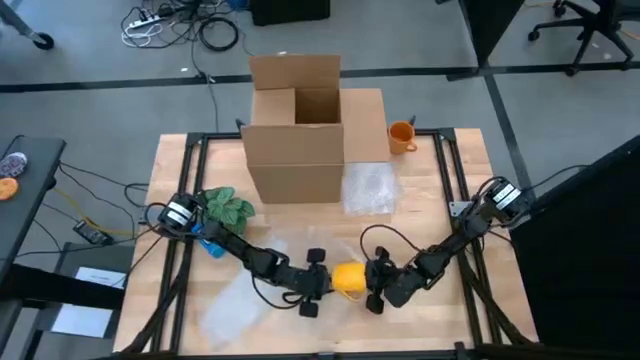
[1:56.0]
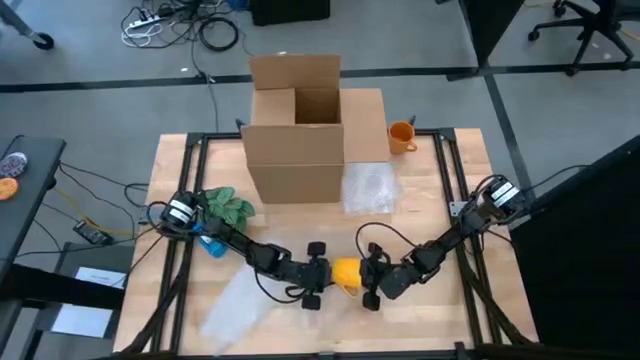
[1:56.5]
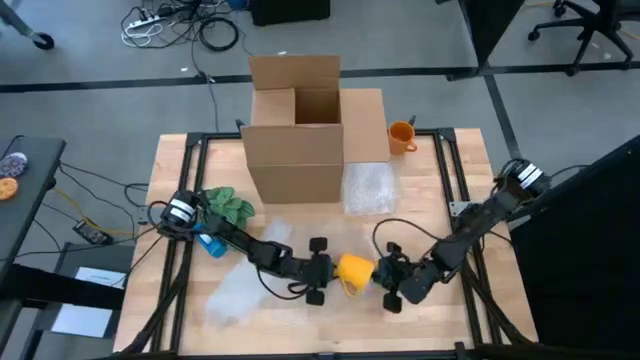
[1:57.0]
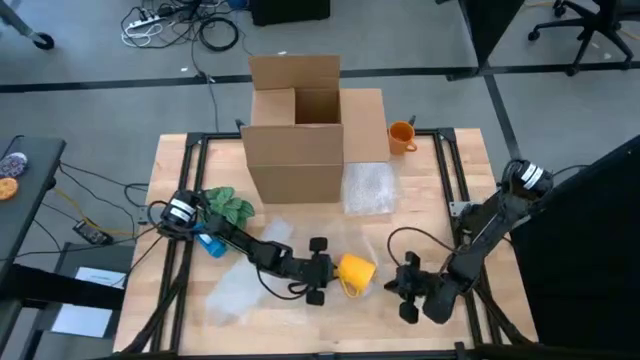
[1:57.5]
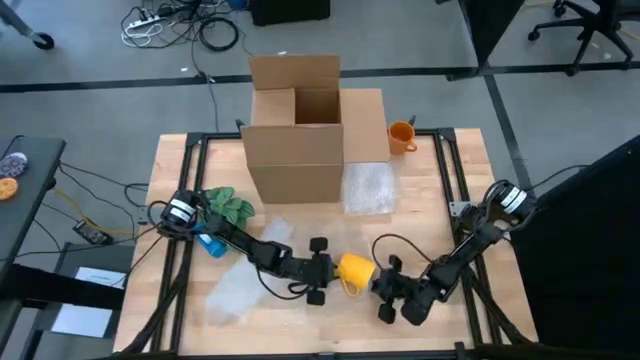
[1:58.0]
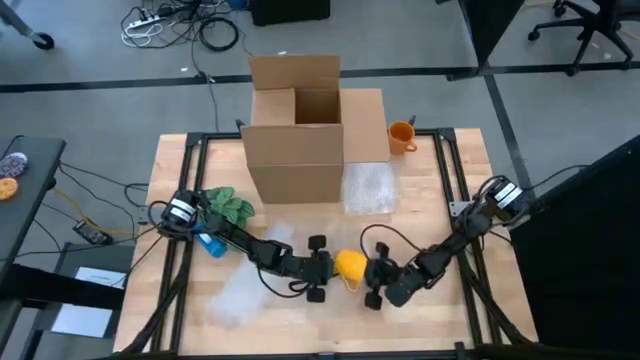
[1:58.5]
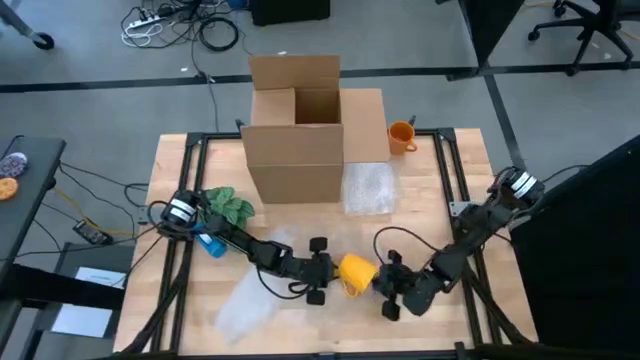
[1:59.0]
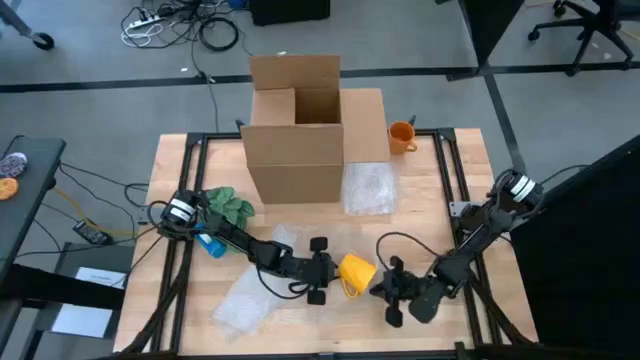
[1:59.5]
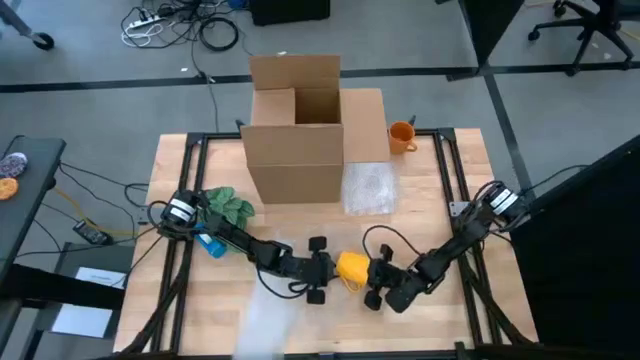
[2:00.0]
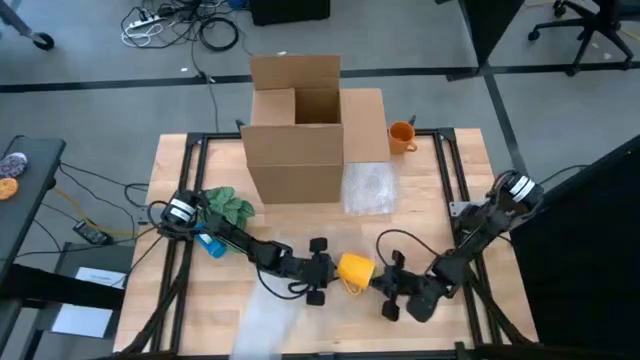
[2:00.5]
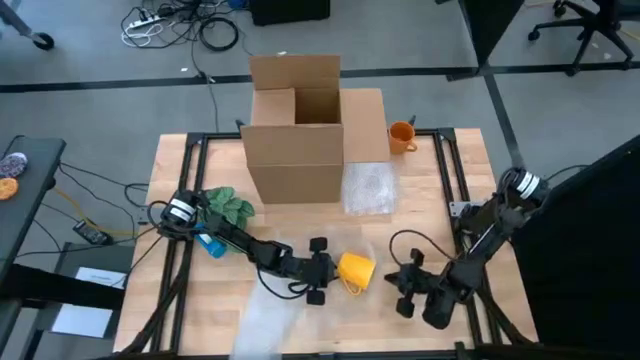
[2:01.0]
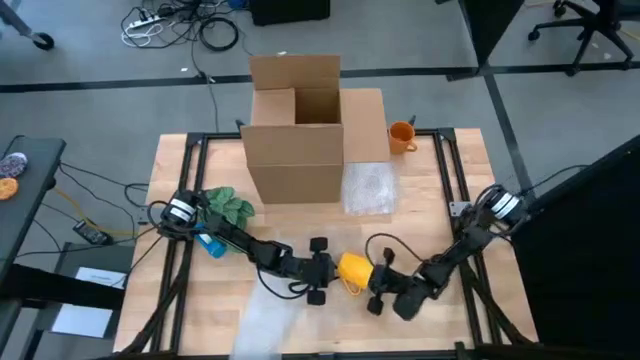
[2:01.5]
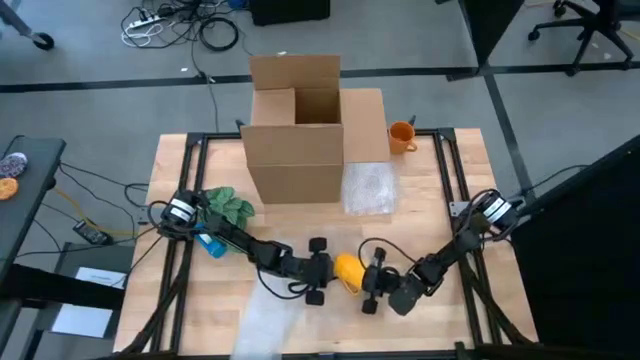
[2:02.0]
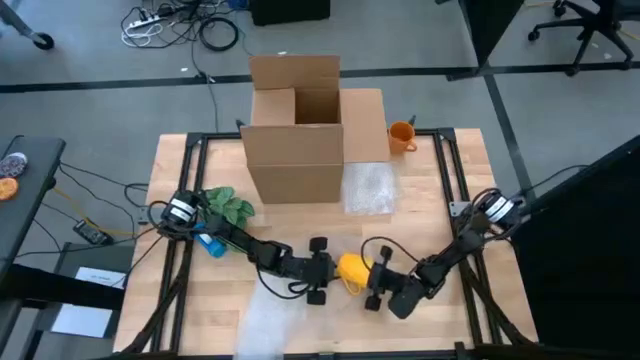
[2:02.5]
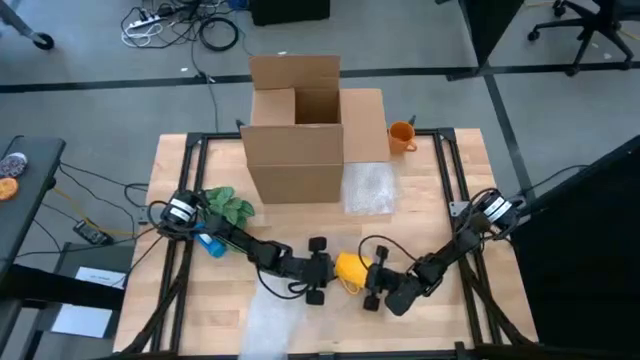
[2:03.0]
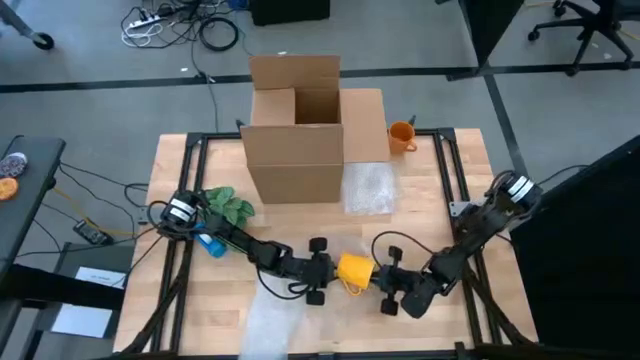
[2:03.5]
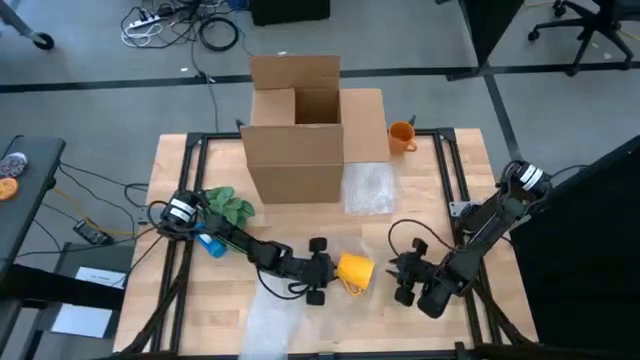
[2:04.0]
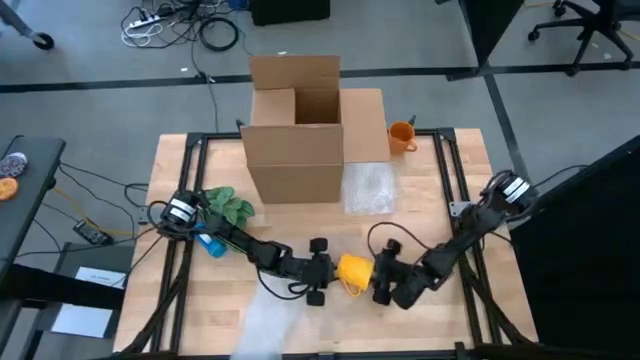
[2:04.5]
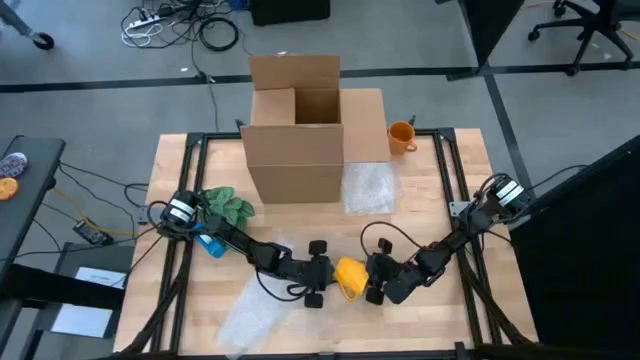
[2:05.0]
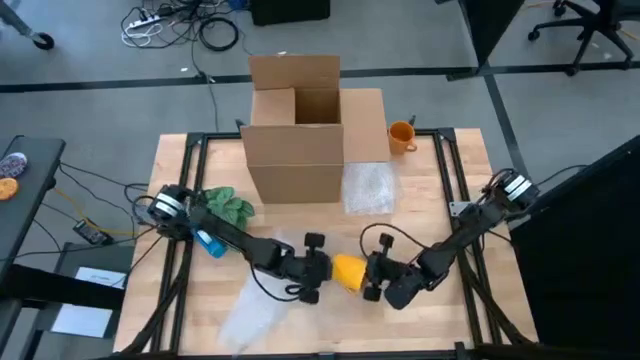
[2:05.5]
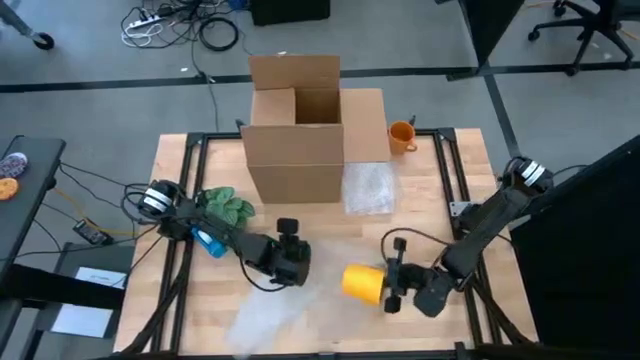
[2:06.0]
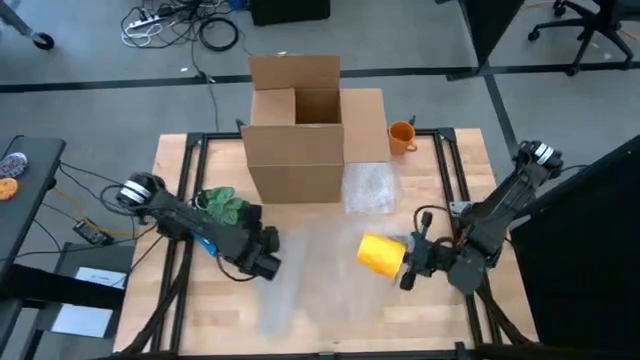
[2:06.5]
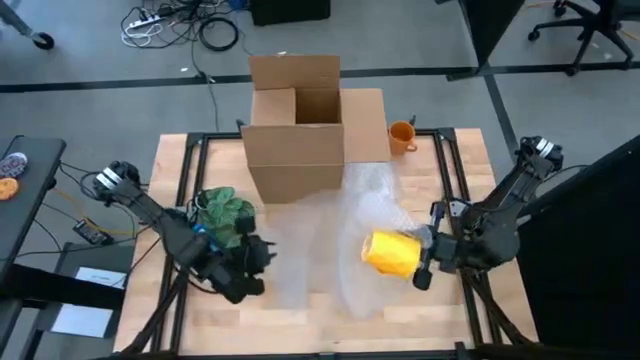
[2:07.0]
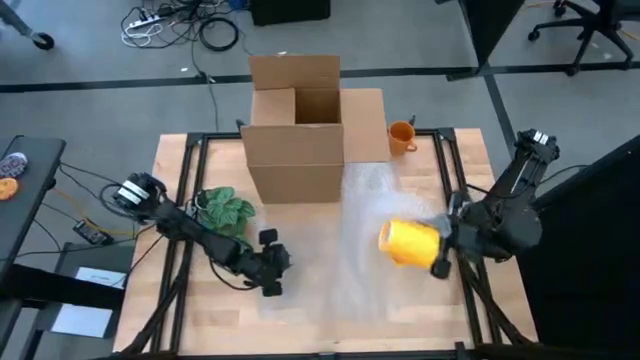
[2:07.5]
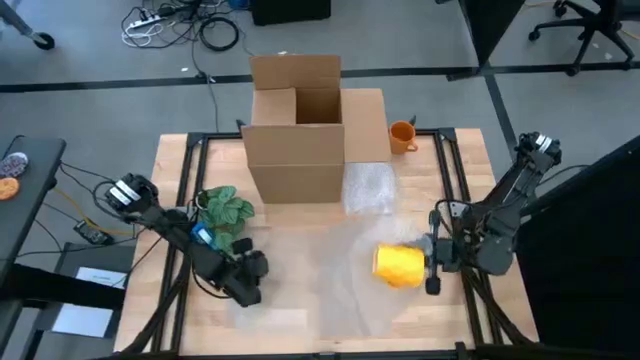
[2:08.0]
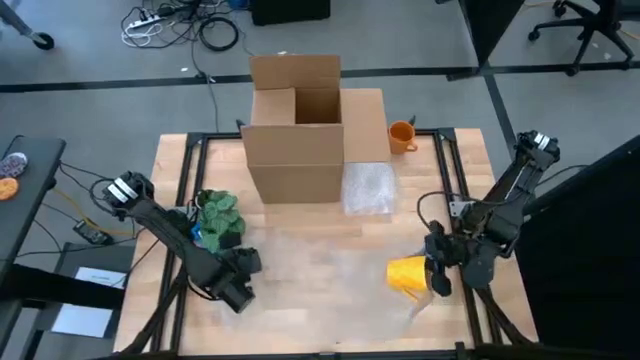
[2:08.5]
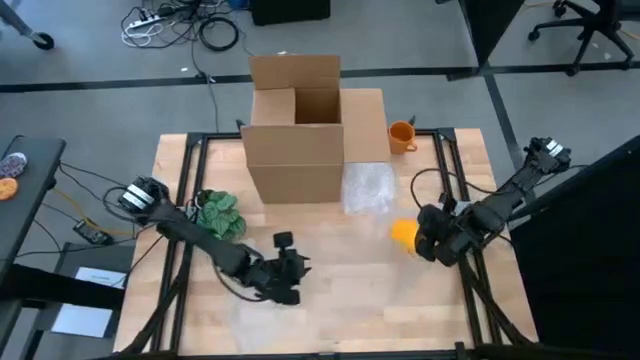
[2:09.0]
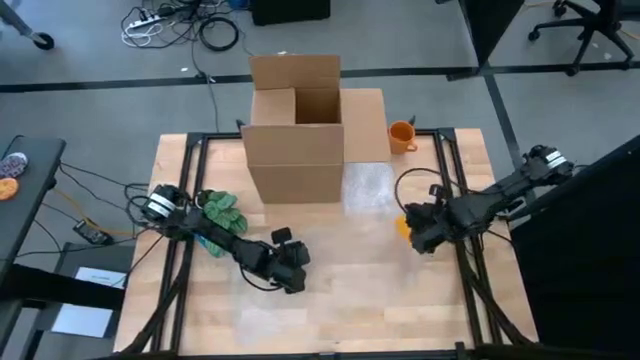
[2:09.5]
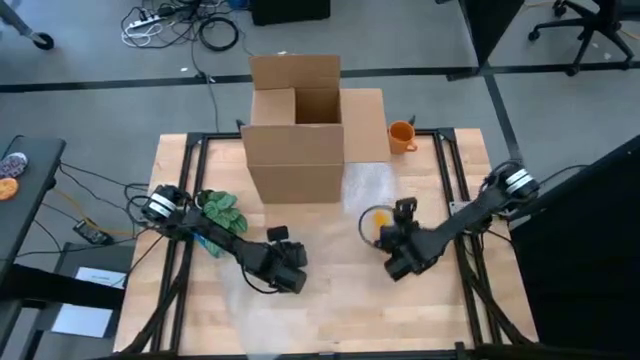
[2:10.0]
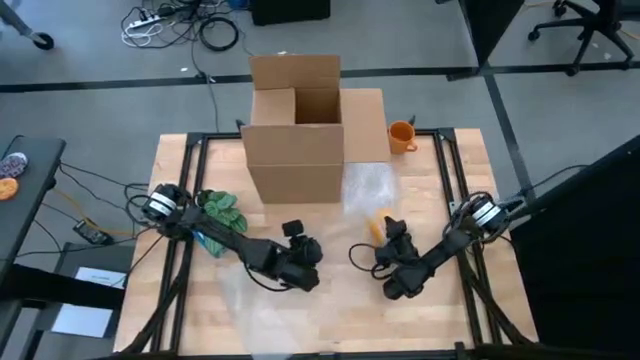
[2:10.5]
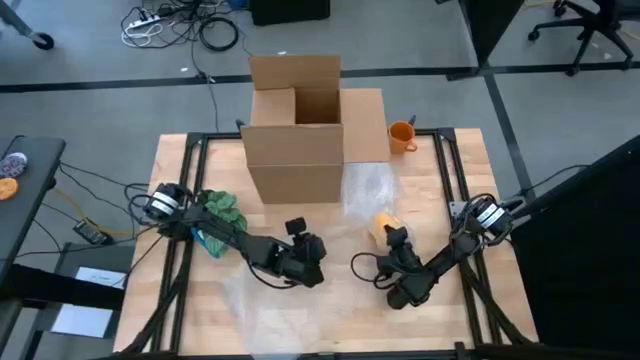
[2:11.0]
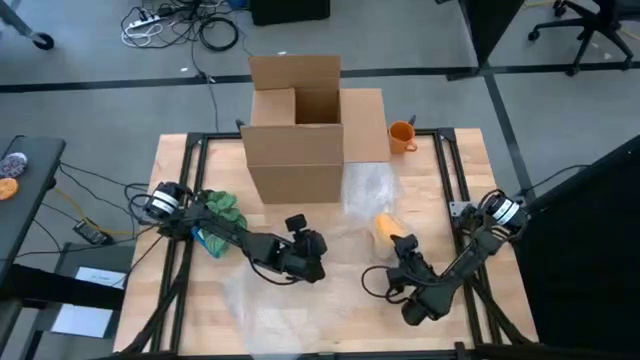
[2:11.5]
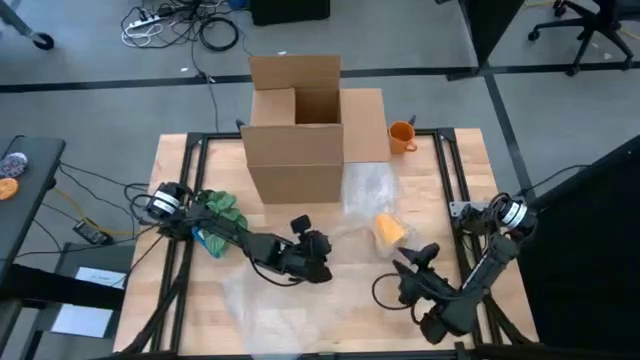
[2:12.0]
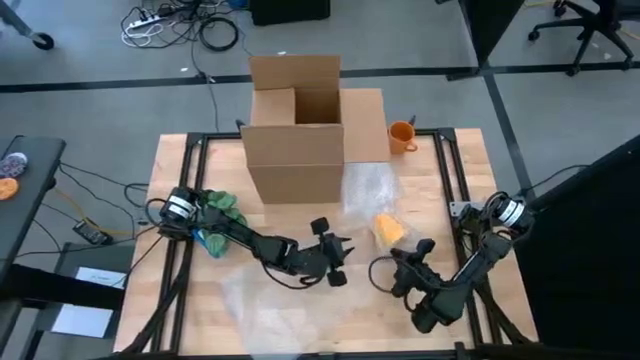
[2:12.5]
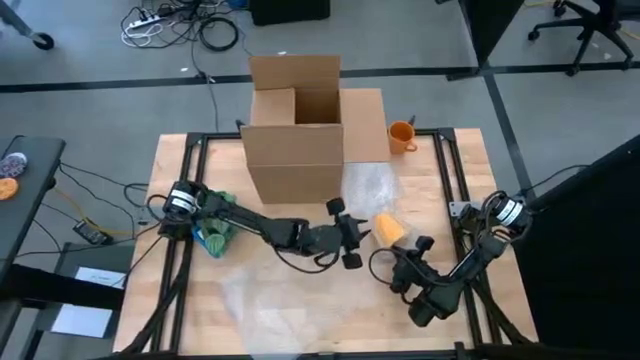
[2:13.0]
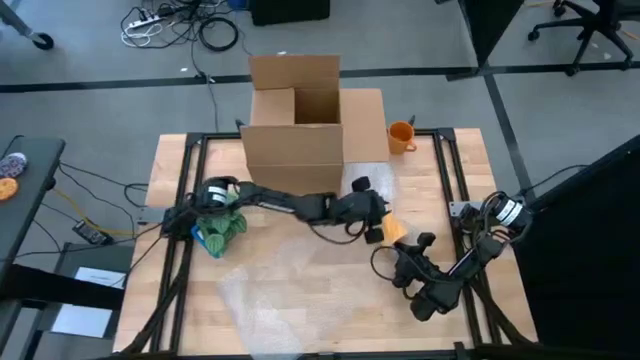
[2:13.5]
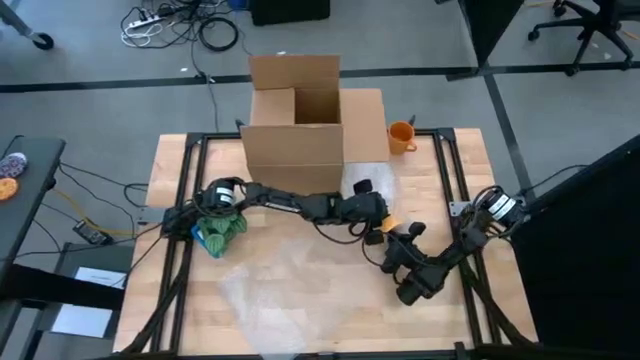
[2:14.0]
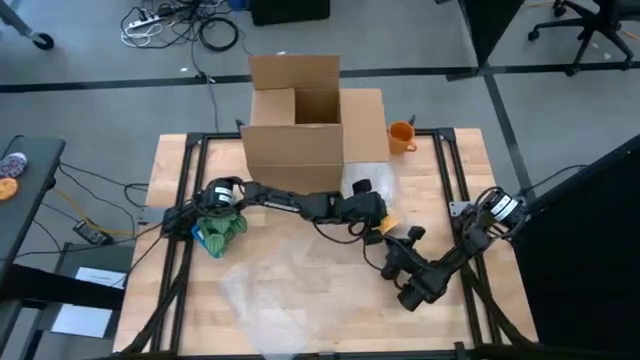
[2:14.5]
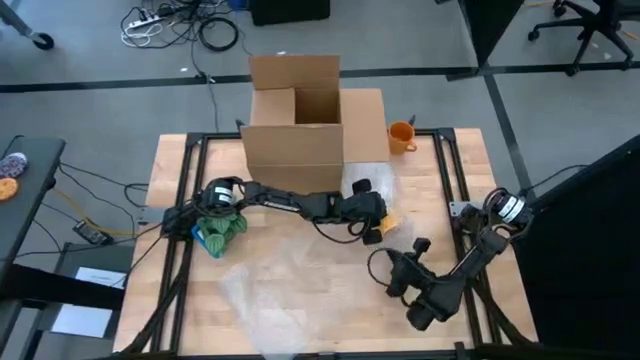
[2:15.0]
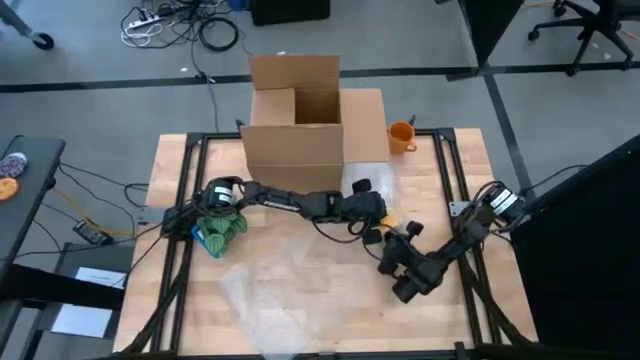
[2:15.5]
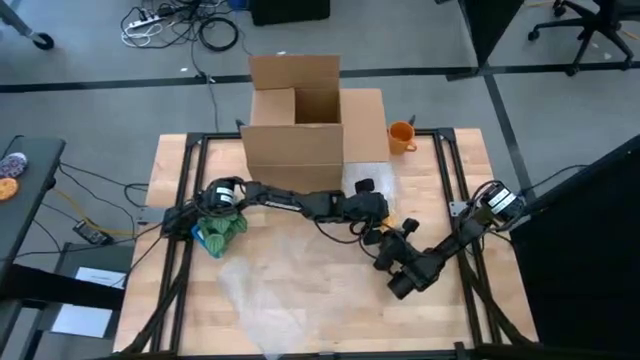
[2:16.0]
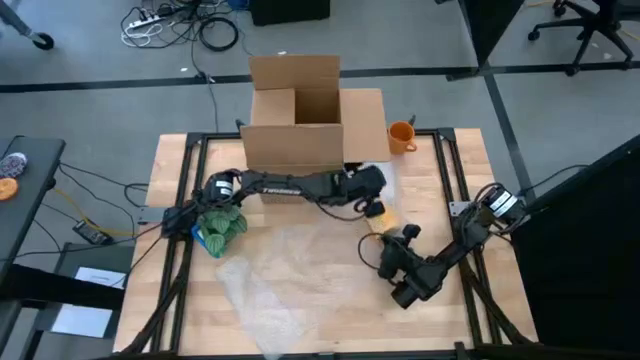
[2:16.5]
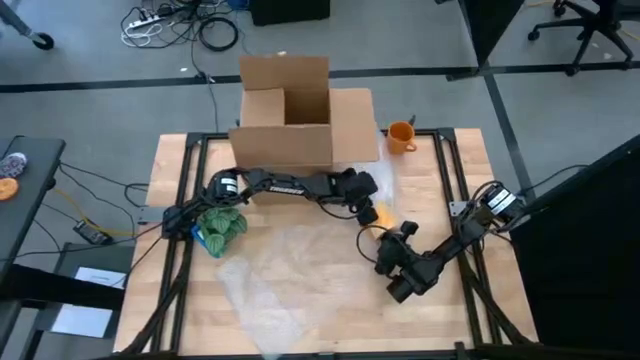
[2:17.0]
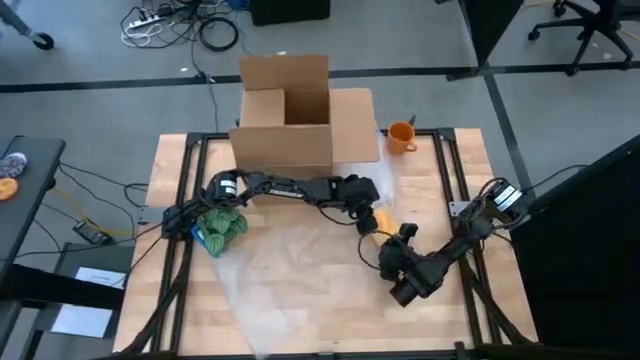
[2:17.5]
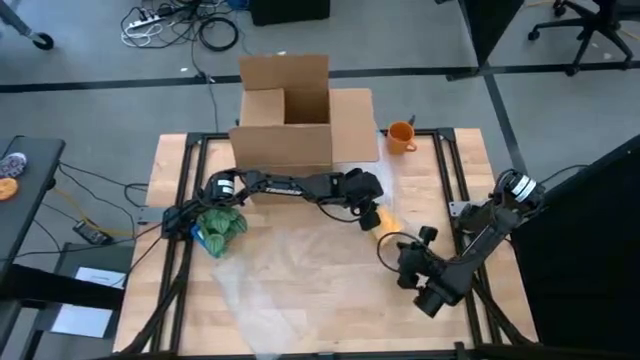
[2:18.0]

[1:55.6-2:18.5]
Task: wrap mug
Wrap the yellow mug with the bubble wrap
